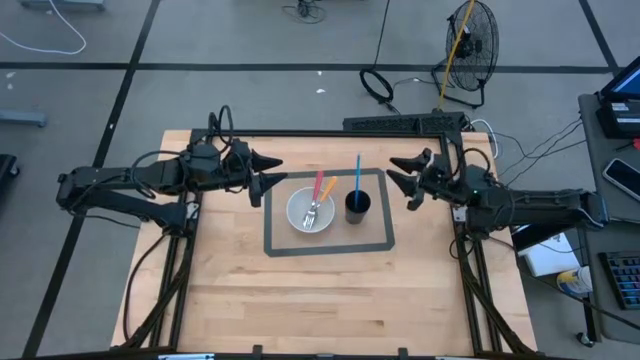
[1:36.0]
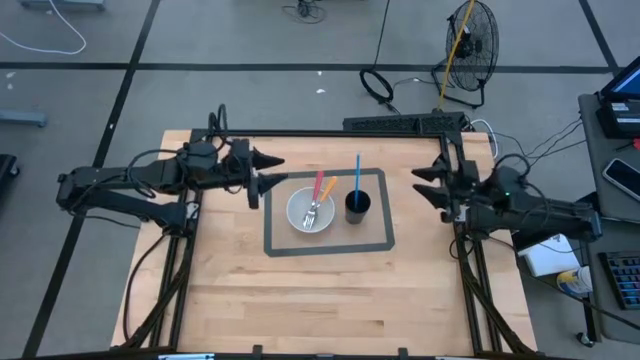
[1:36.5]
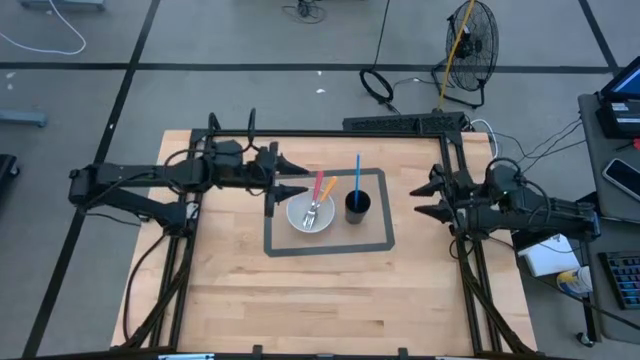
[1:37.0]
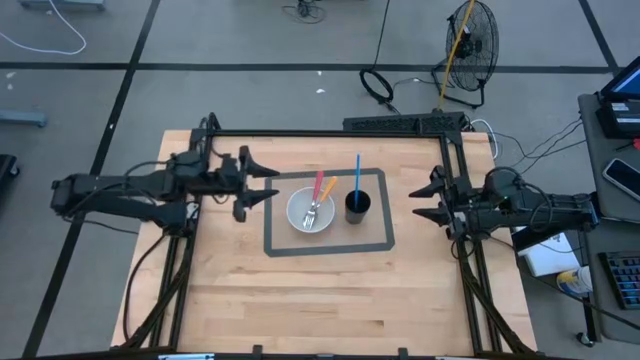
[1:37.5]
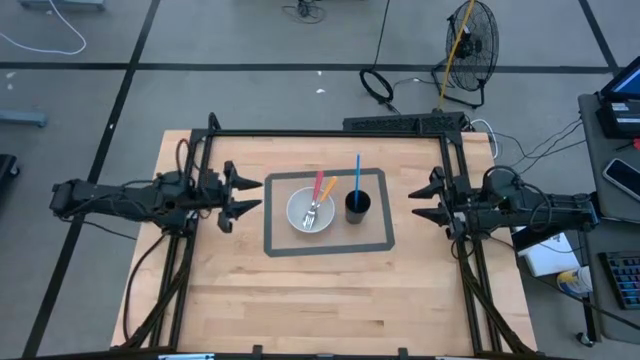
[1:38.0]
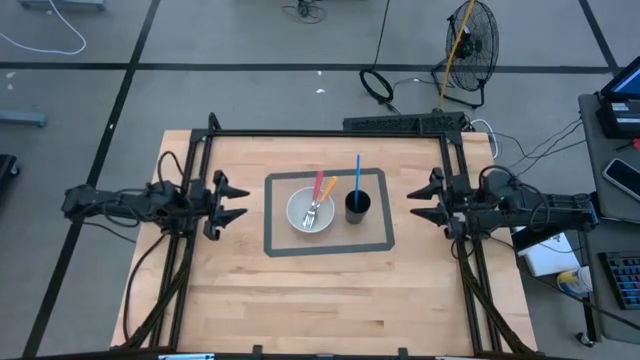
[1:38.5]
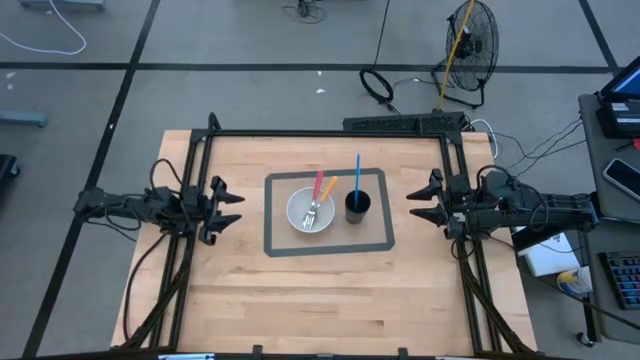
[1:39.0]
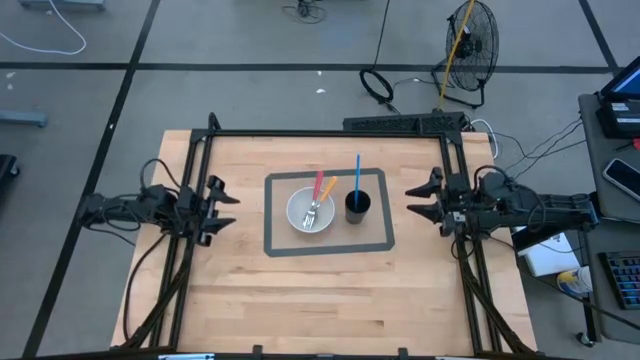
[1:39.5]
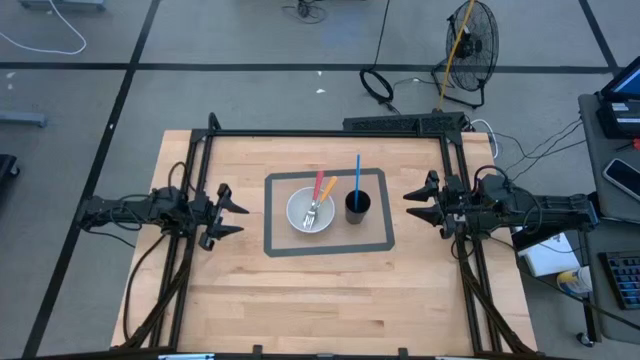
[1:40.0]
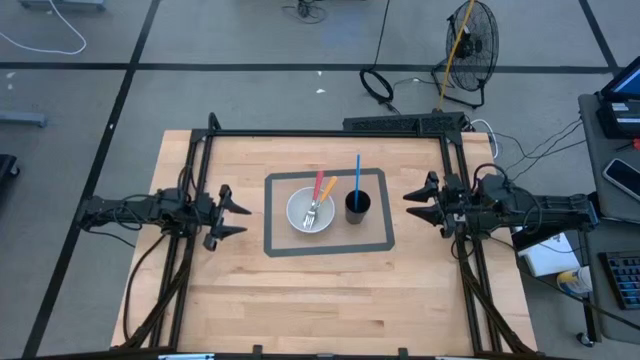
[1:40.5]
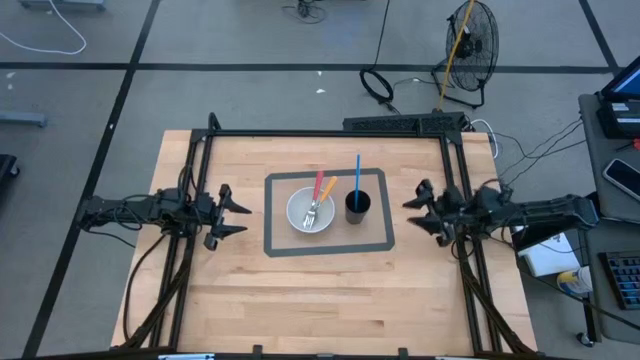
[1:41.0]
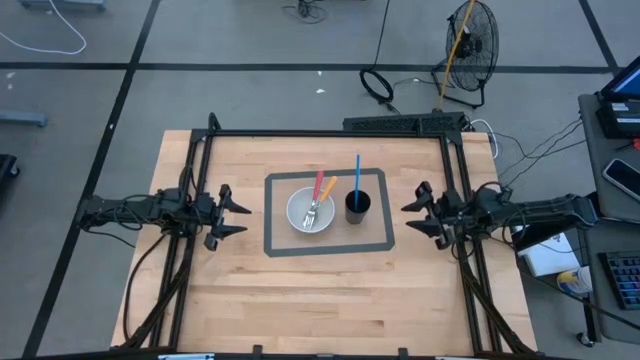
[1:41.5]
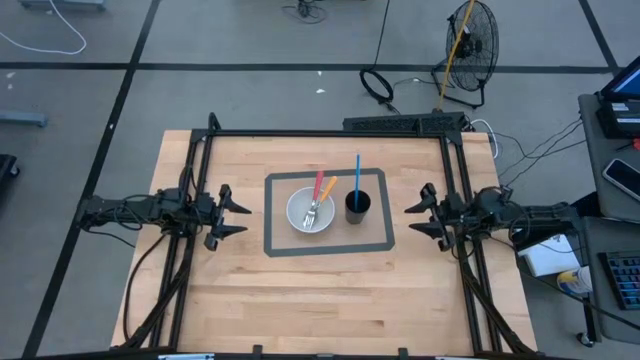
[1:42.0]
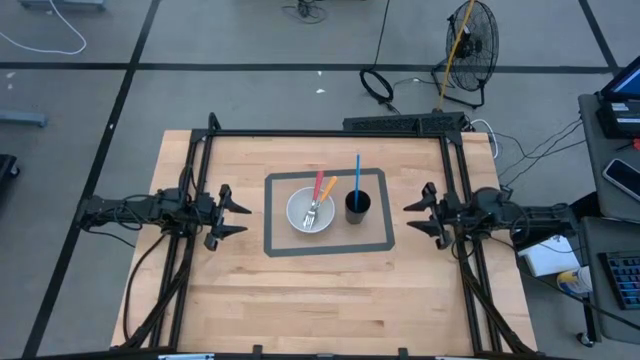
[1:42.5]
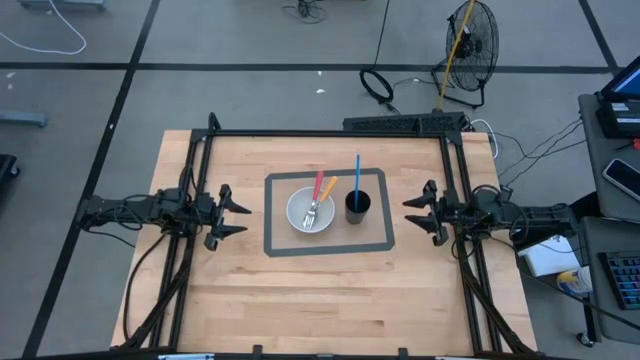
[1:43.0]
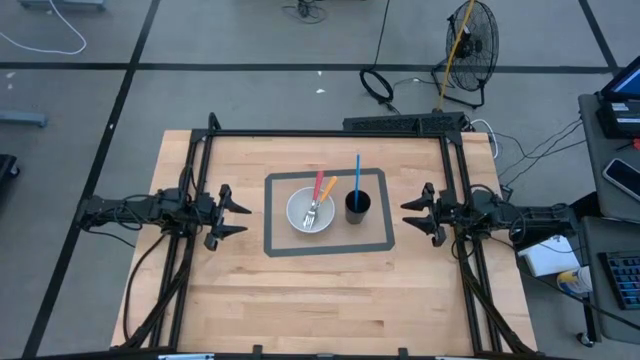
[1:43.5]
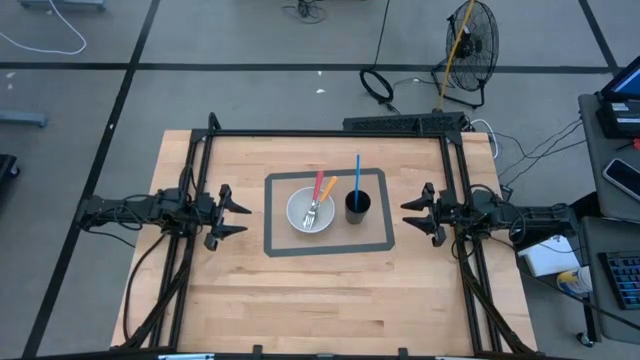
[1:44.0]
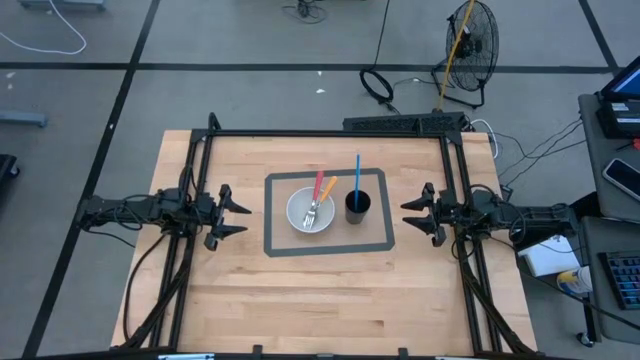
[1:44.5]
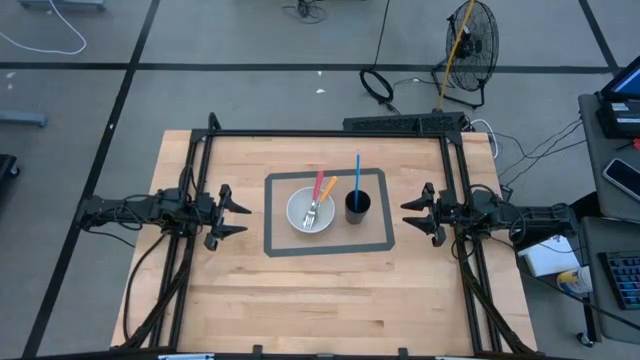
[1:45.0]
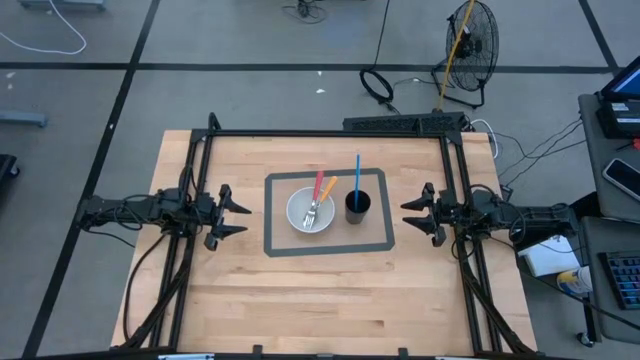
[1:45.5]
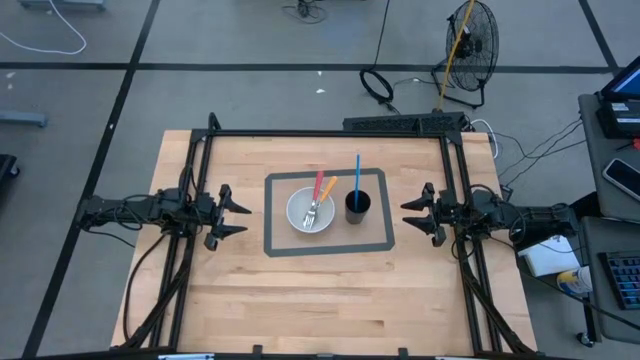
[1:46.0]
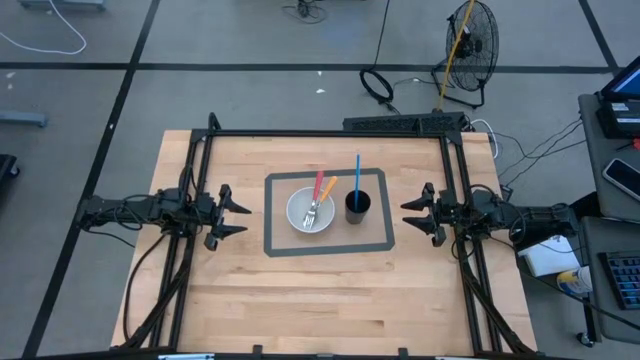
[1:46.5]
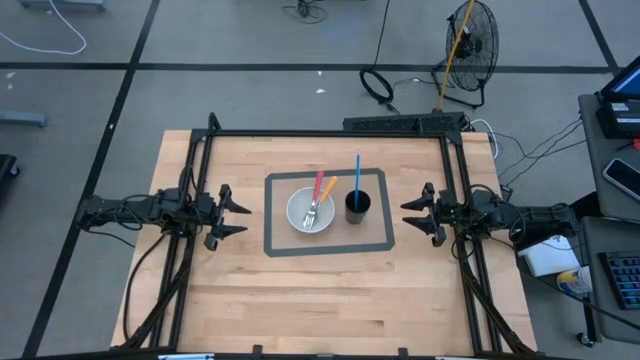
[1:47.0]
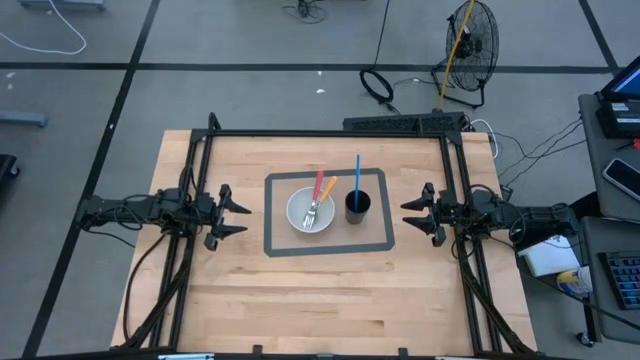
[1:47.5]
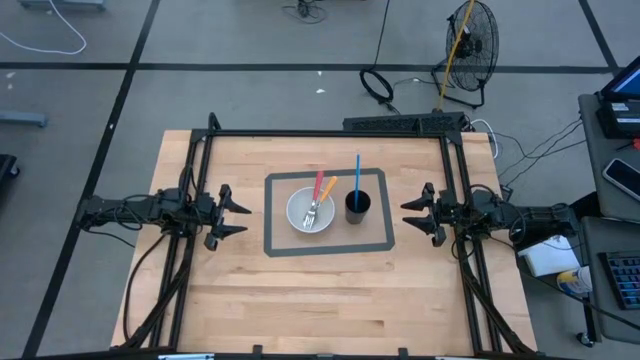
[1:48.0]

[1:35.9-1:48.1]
Task: Pick & Place Utensil
Return to Home Position

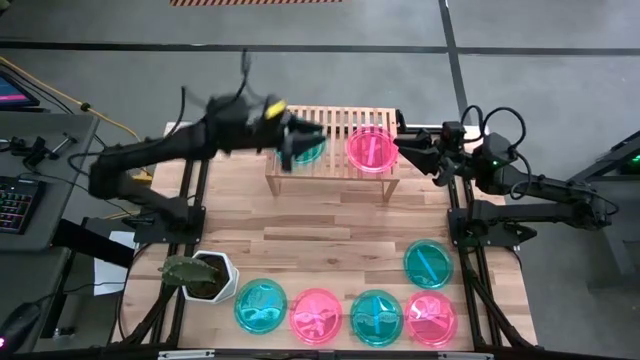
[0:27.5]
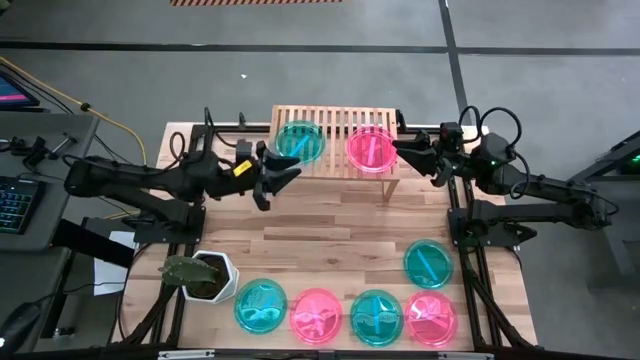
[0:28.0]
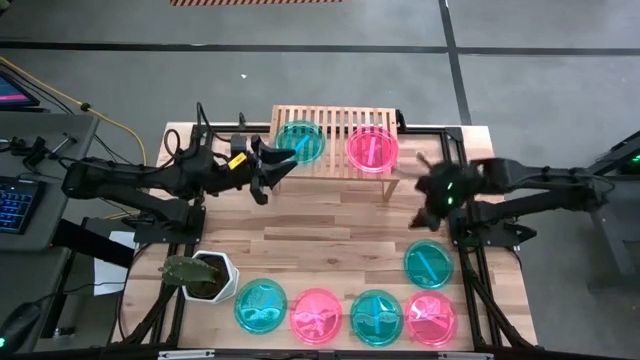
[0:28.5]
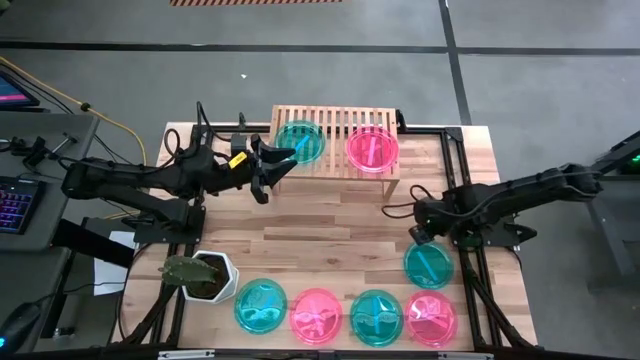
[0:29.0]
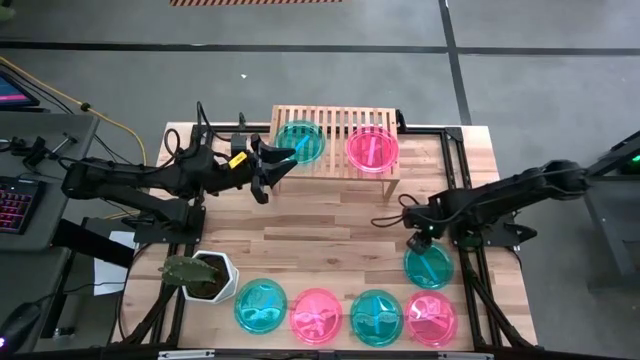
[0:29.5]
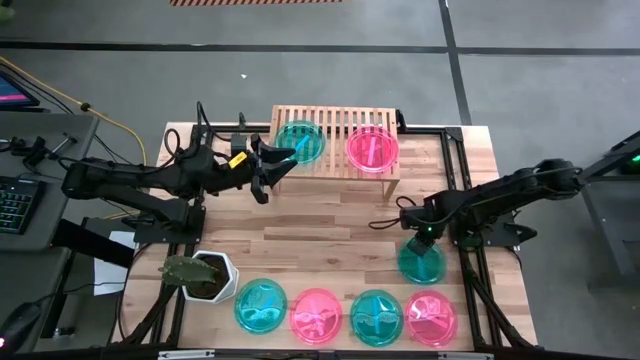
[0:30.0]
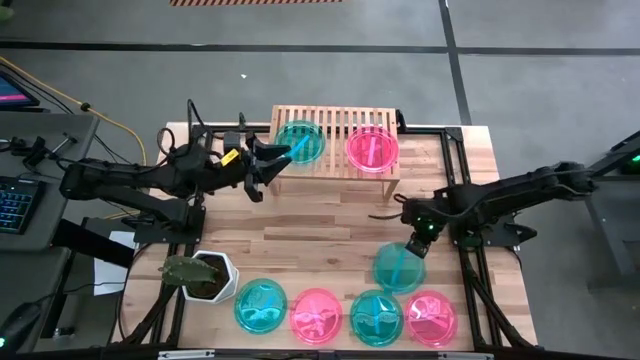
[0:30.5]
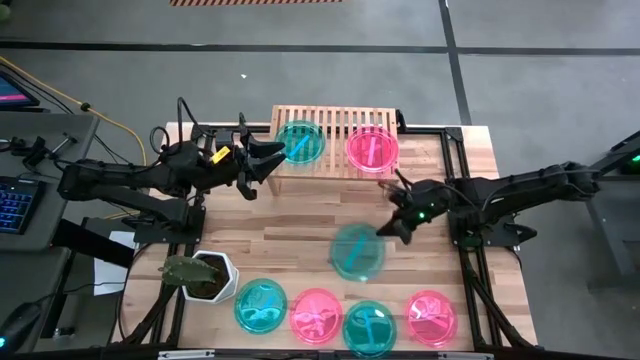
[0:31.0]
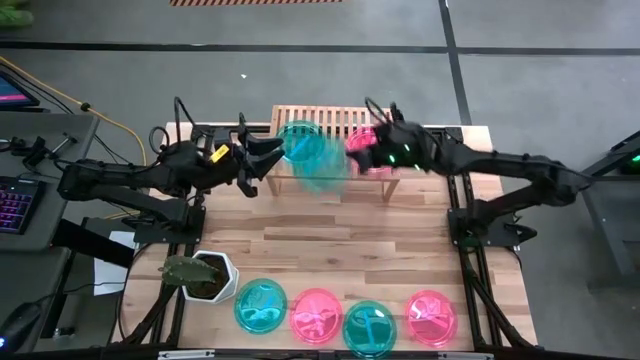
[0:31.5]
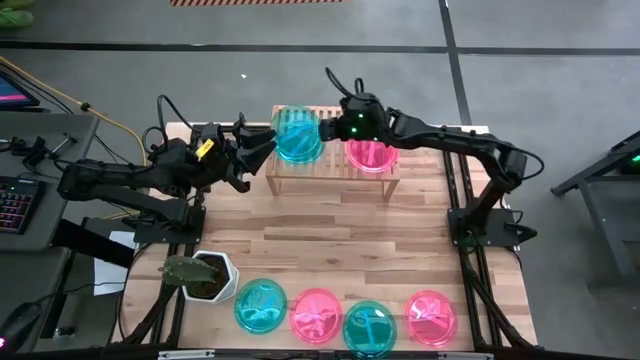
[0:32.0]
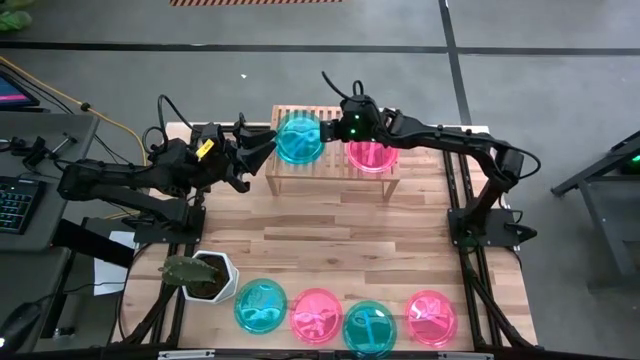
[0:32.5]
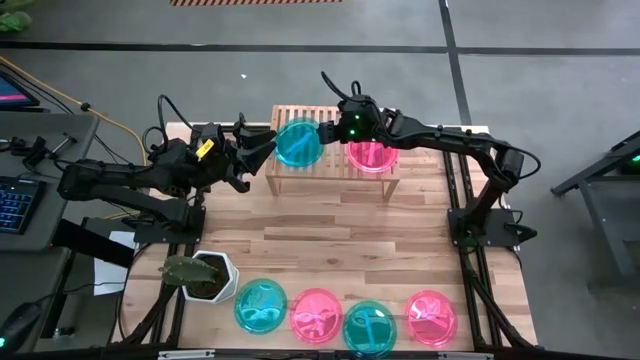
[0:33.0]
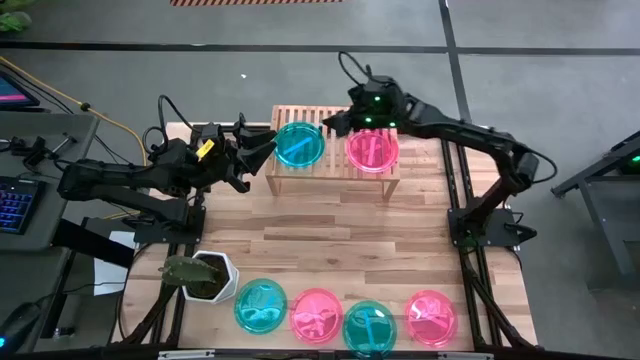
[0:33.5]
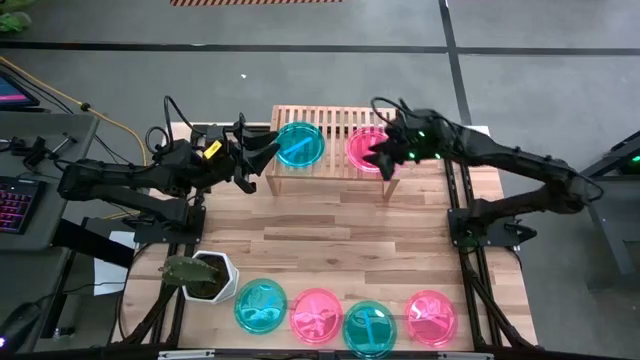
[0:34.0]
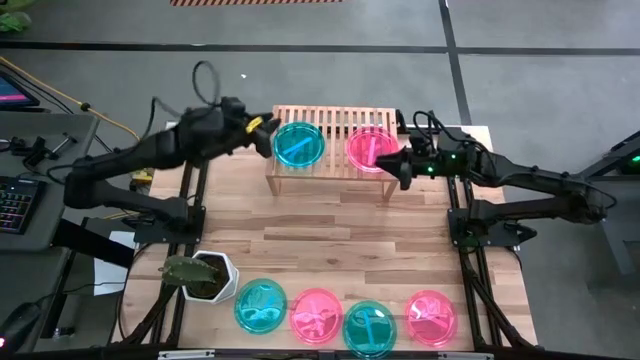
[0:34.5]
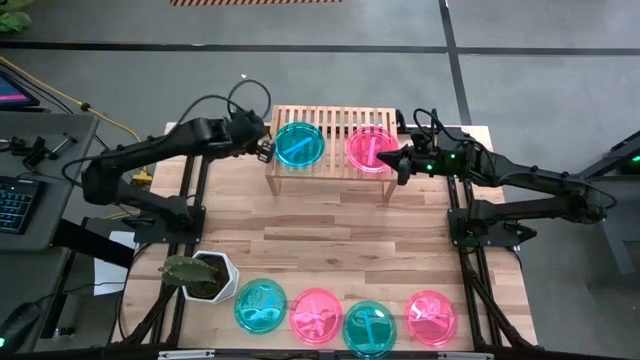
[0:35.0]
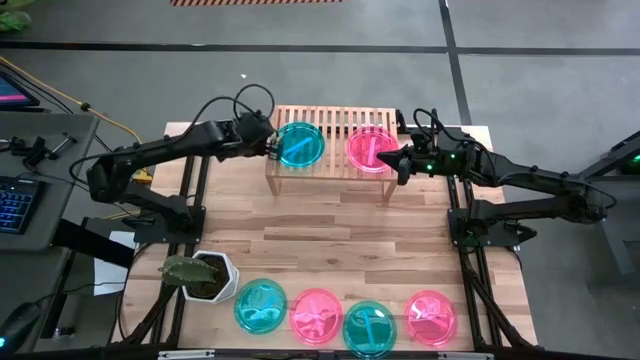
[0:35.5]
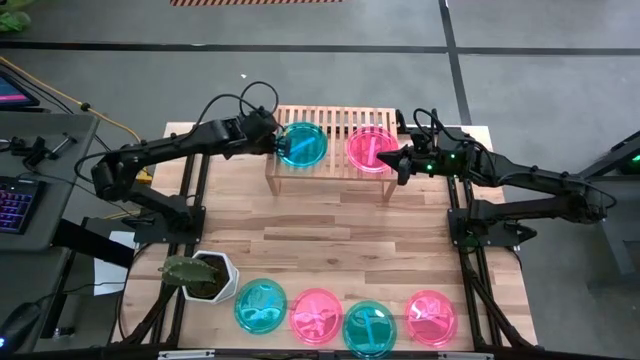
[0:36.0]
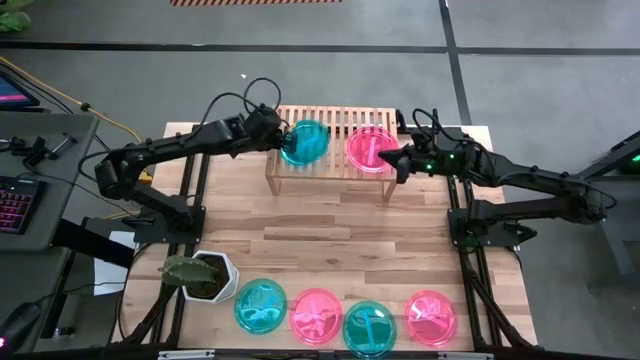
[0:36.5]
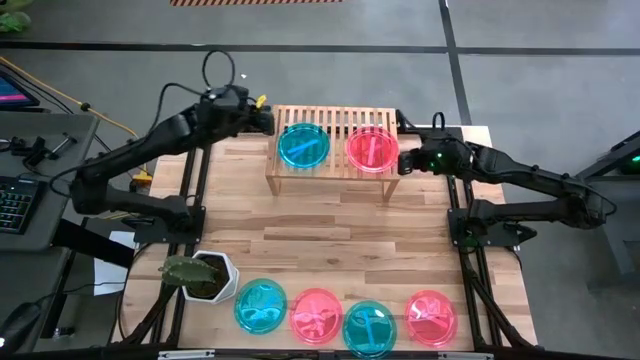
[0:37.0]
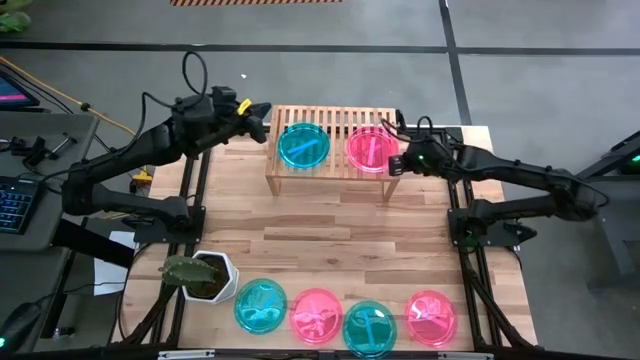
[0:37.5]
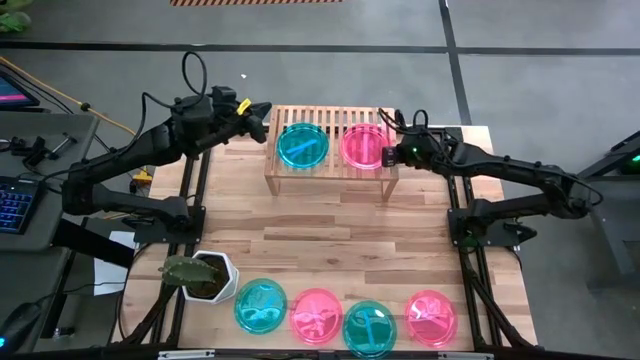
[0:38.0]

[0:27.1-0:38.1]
Task: Place and stack plates onto a shelf
Stack the top blue plate on the blue plate
